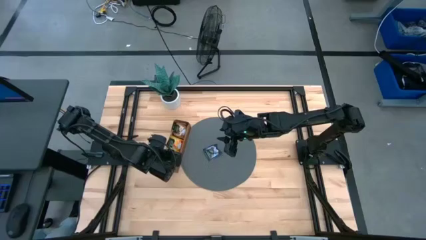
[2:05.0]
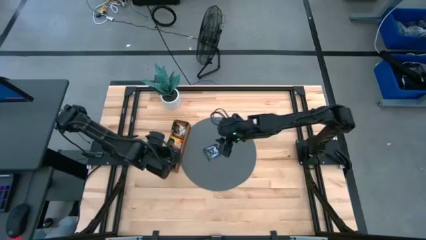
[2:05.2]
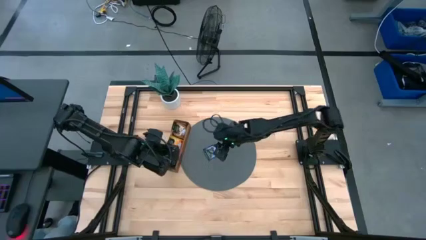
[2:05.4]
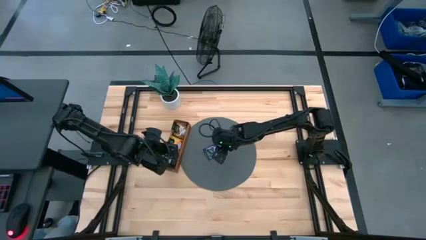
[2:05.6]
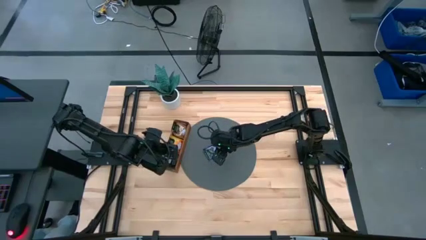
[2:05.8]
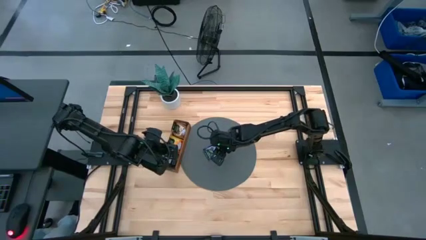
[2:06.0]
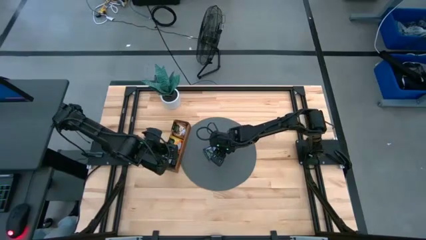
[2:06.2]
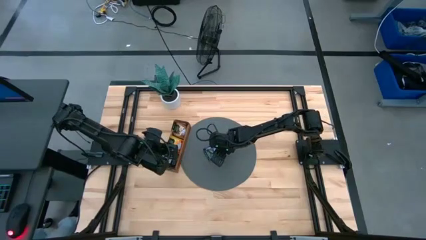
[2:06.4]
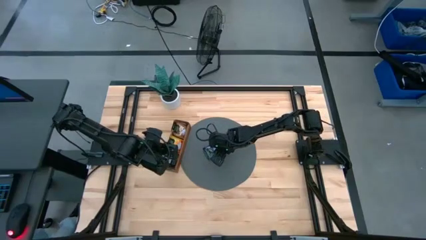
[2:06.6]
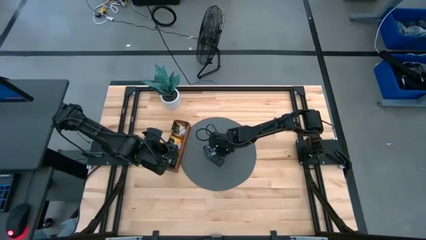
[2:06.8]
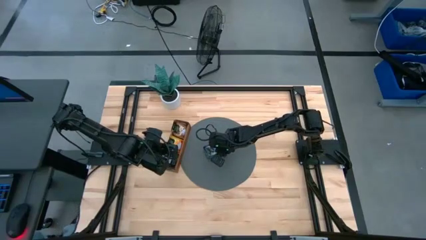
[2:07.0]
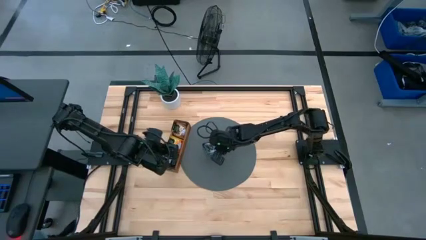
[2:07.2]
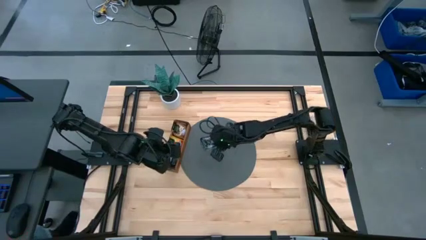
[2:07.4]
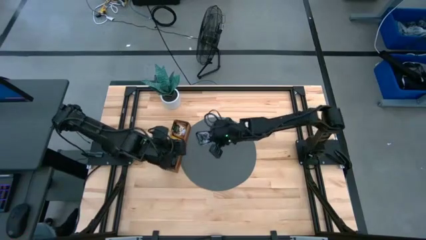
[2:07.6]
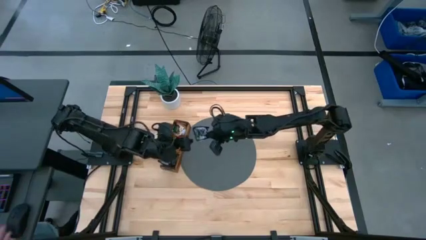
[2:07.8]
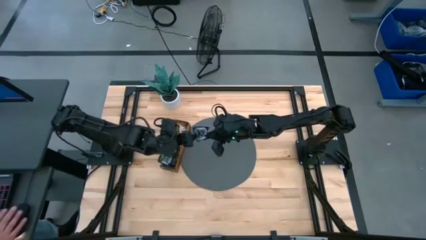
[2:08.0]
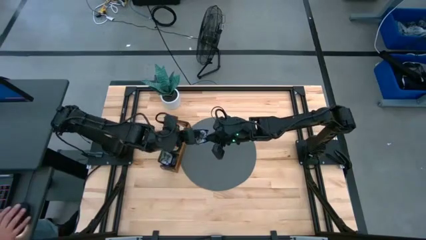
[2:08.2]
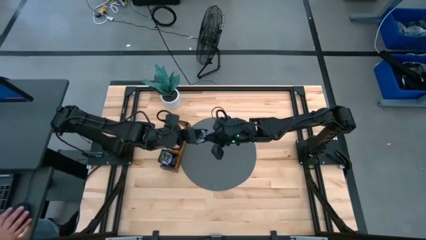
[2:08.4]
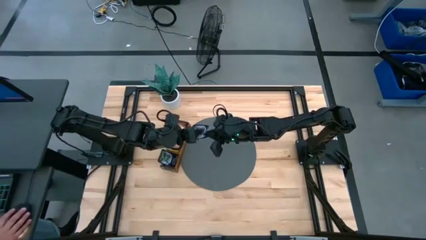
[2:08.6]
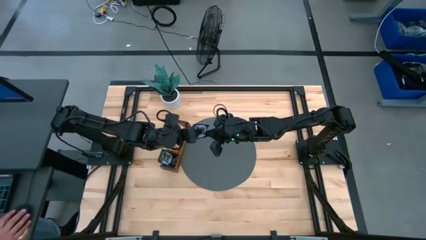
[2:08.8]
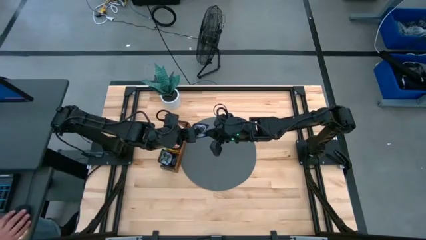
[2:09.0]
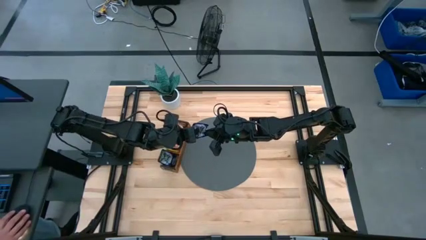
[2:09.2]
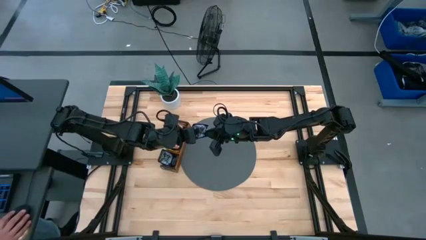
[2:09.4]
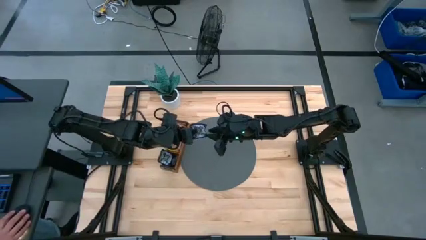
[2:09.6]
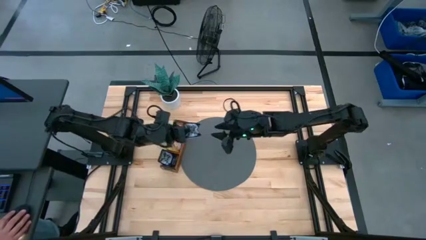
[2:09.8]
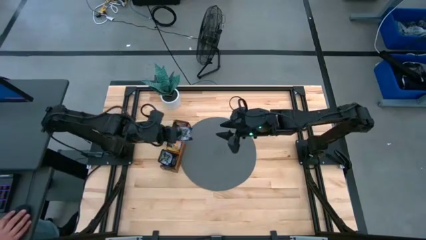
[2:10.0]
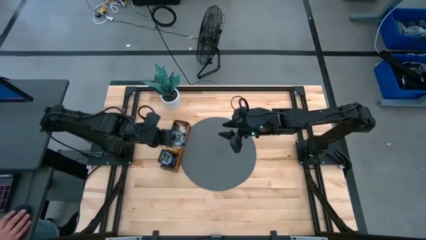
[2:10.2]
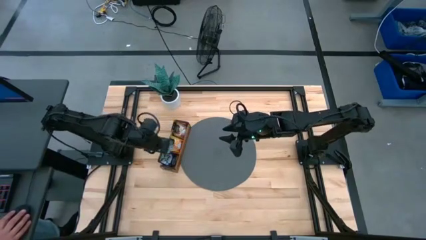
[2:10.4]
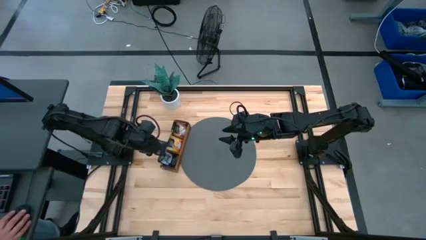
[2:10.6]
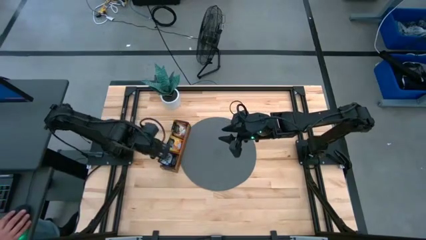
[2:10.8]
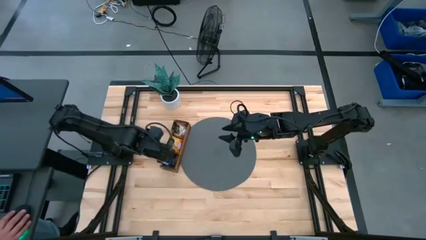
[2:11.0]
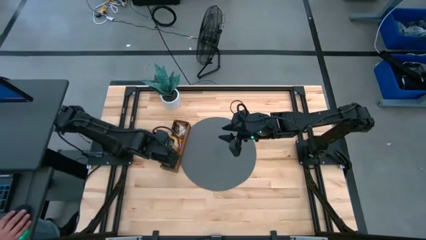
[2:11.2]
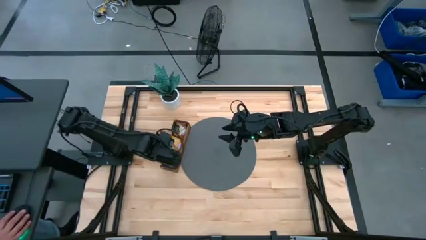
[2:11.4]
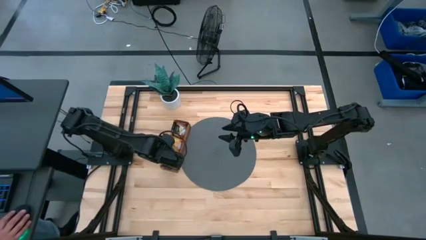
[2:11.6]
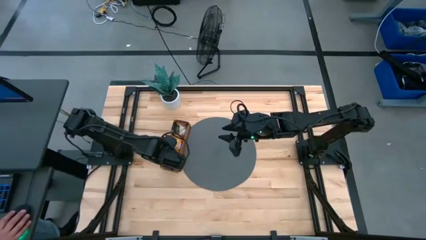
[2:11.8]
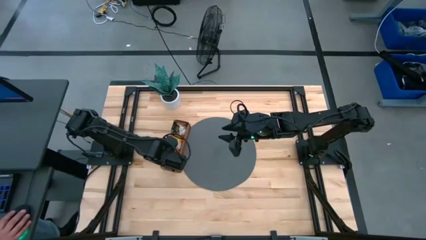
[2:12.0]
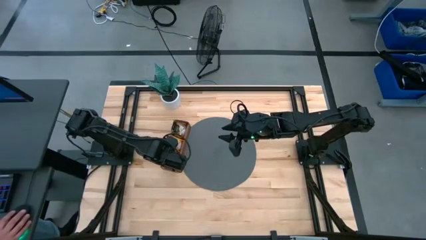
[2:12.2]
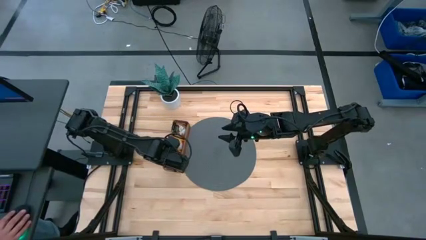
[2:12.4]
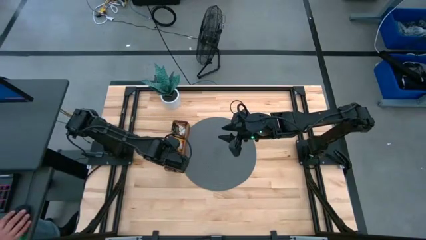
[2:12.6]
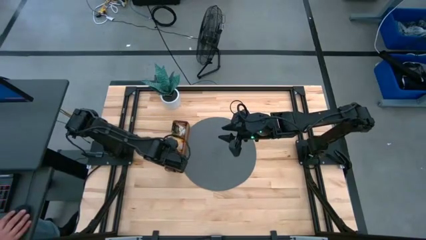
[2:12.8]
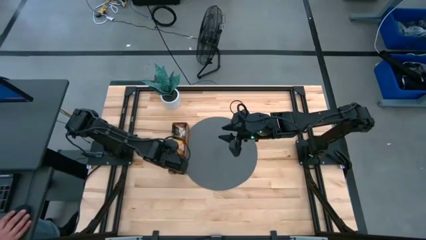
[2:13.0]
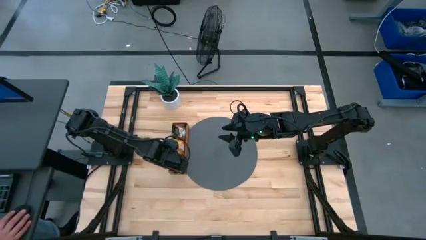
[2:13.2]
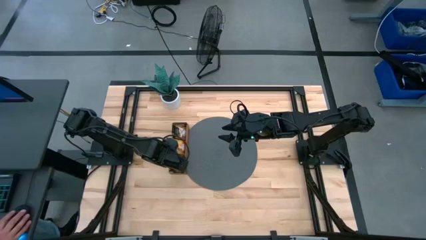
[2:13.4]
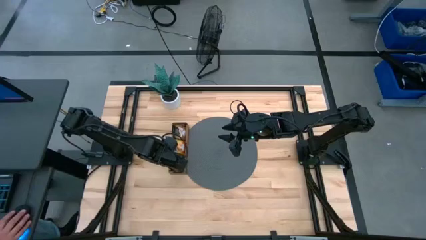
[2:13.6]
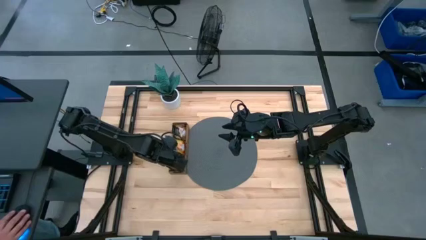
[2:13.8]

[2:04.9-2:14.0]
Task: Pick & Place Tea
Put the purple tea bag into the bottom section of the wooden organizer

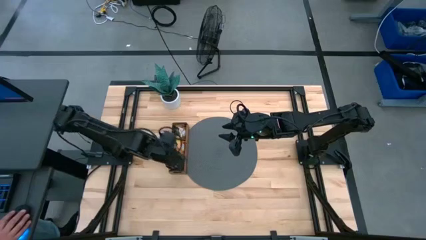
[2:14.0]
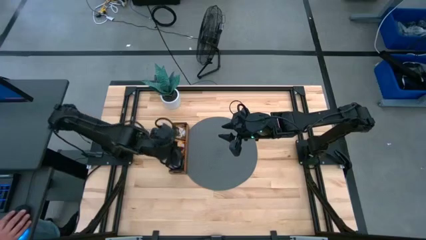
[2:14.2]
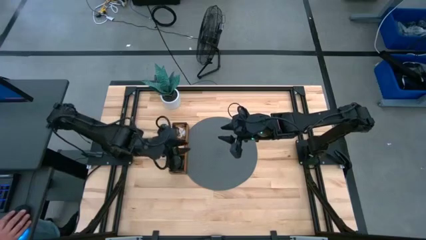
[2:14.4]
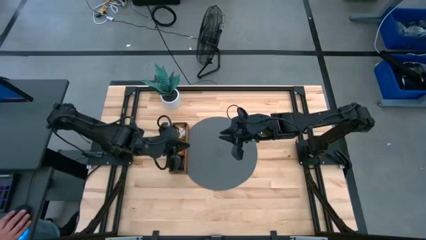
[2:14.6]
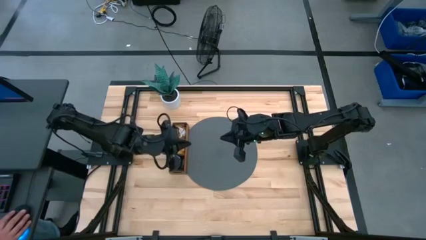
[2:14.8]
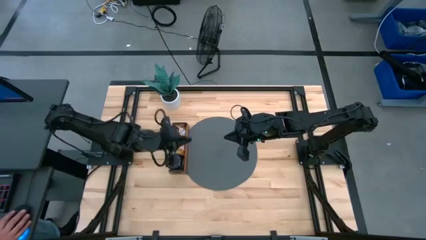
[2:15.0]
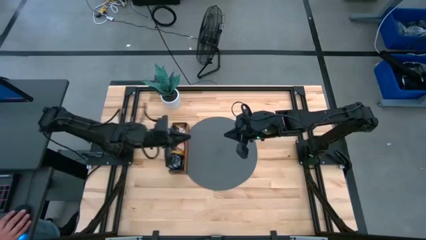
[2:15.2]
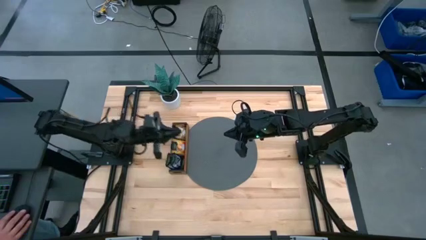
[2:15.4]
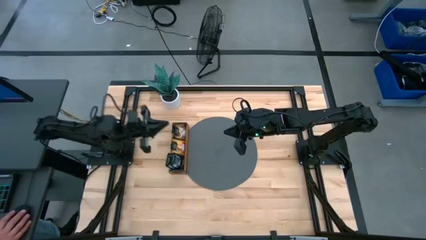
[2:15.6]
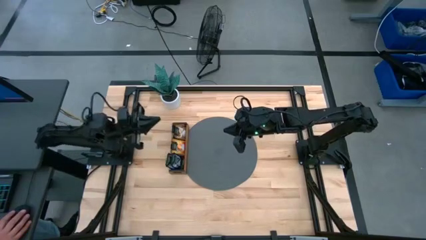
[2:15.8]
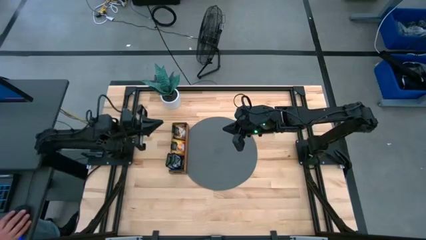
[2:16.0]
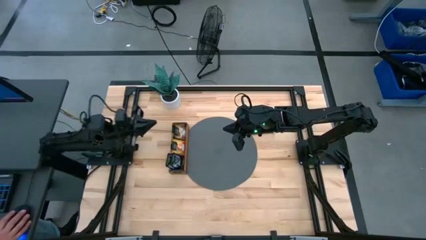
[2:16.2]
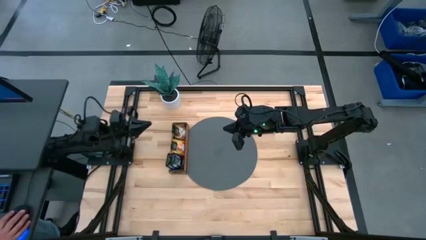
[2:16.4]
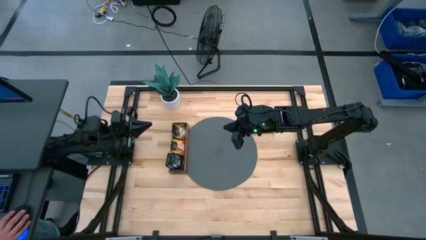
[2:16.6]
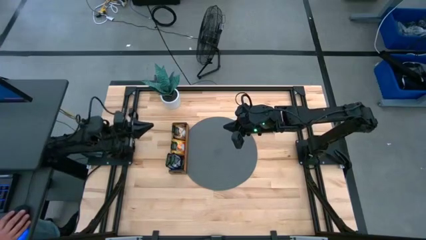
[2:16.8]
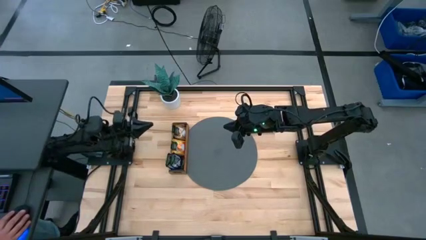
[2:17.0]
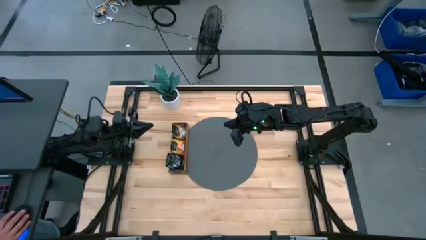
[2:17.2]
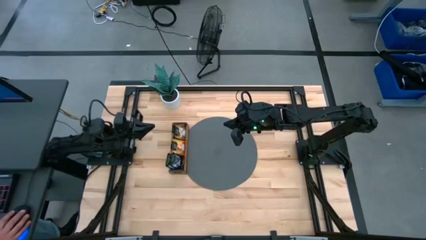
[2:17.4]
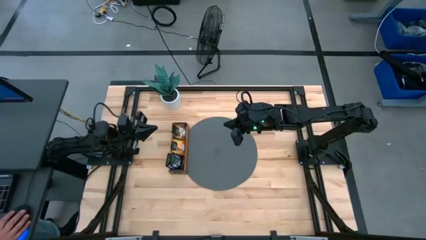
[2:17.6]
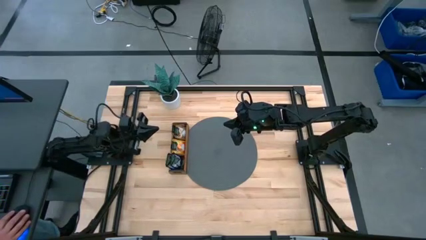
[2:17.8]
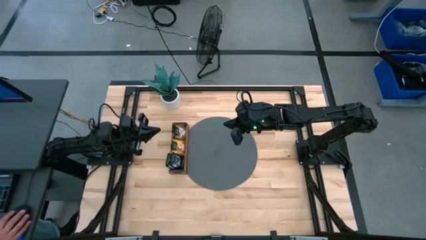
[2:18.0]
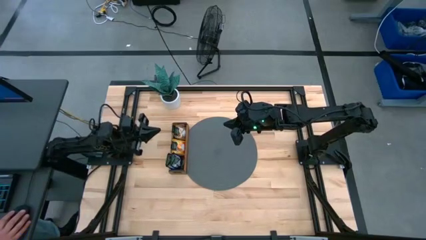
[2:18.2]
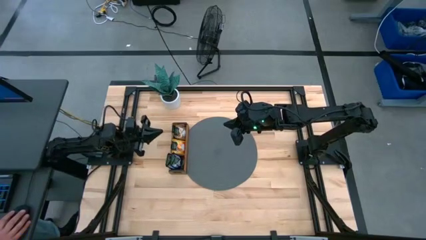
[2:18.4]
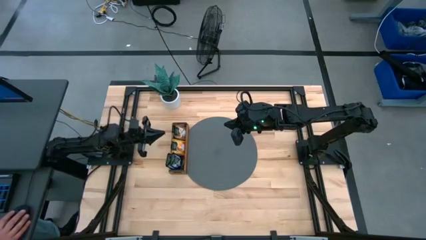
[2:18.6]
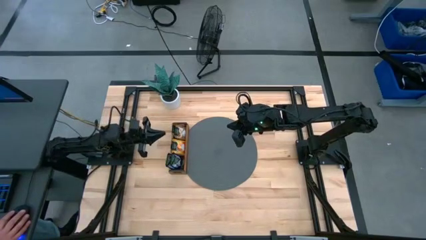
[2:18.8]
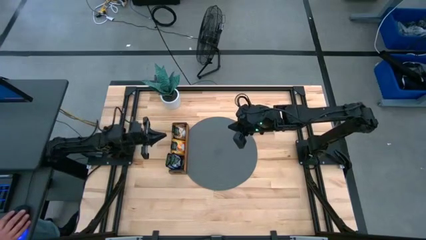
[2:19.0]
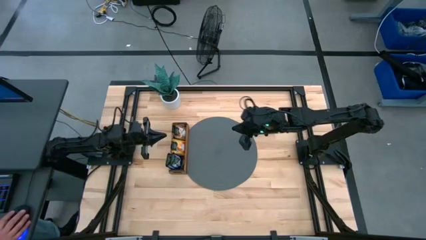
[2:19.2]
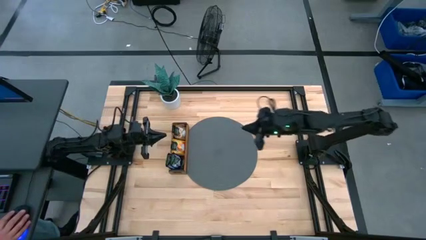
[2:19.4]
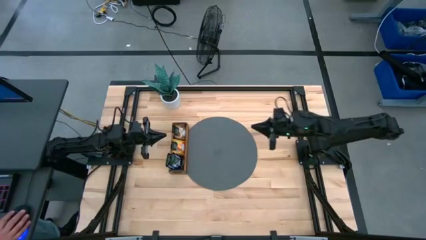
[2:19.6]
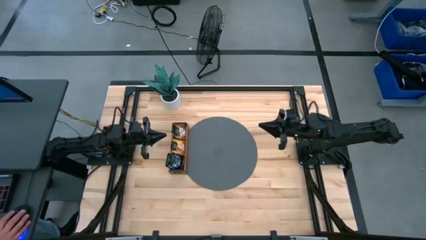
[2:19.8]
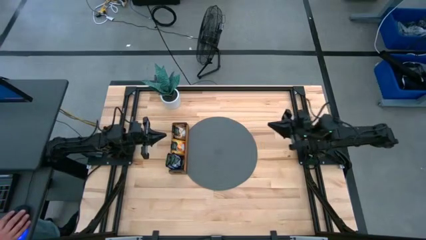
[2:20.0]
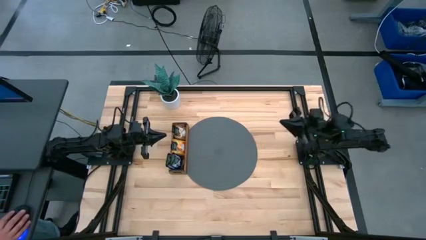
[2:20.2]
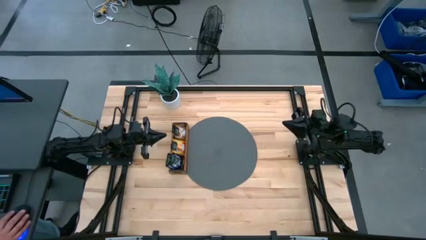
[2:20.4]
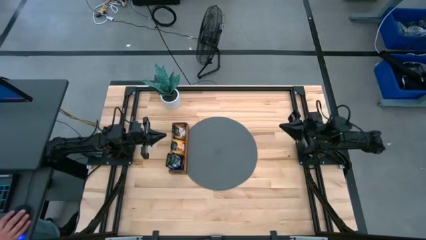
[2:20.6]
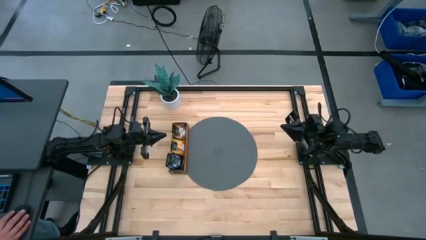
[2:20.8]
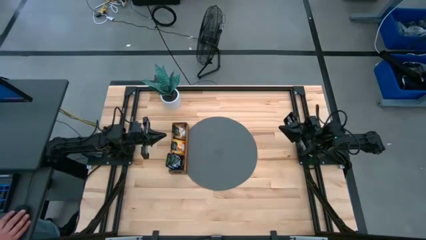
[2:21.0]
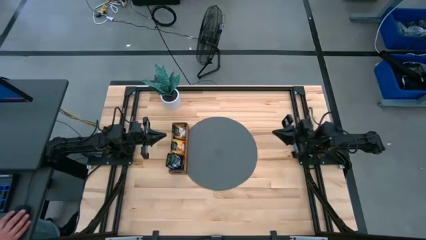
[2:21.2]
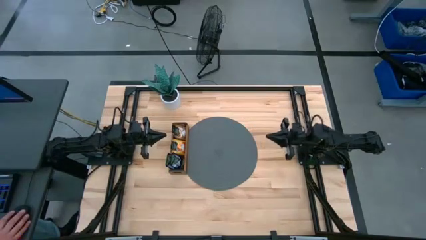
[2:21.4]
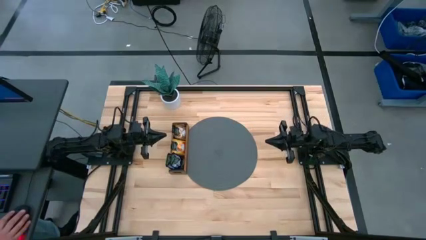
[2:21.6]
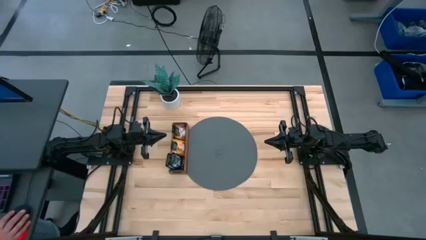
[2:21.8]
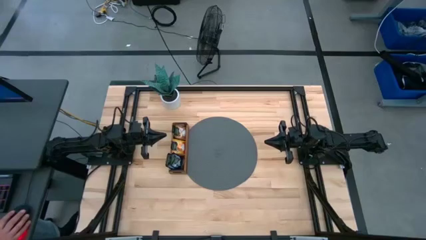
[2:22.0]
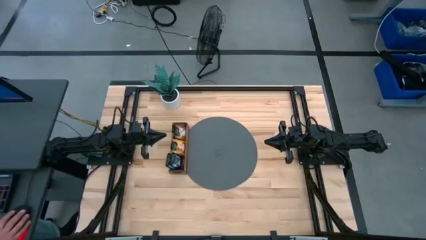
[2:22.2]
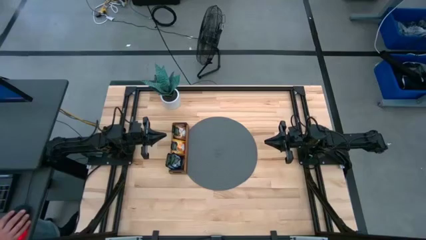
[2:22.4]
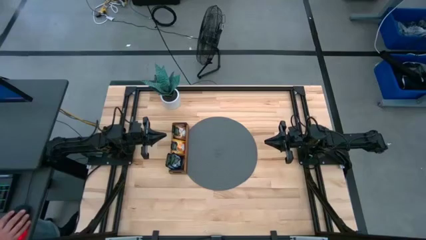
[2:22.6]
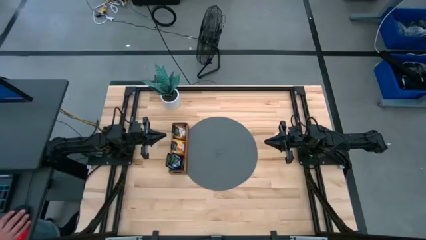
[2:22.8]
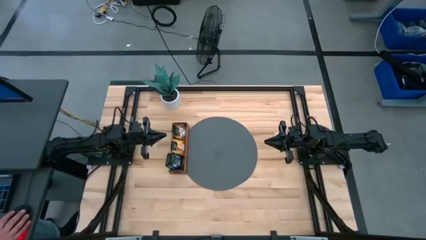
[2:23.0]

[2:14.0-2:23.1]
Return to Home Position
